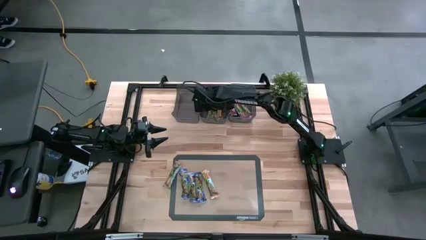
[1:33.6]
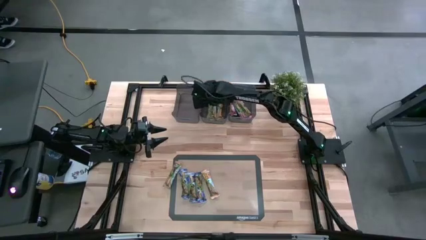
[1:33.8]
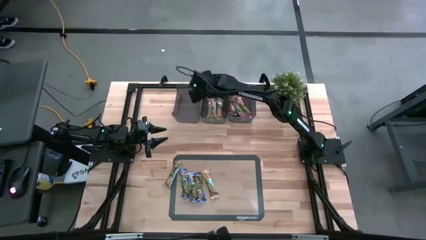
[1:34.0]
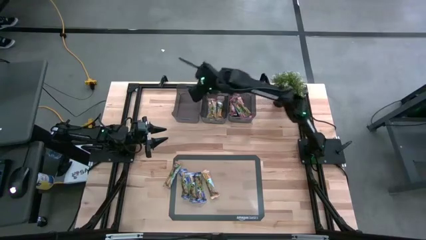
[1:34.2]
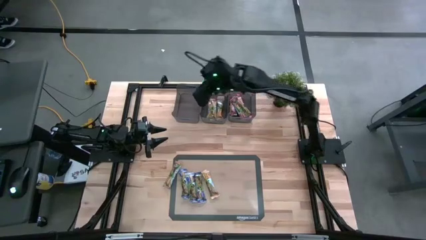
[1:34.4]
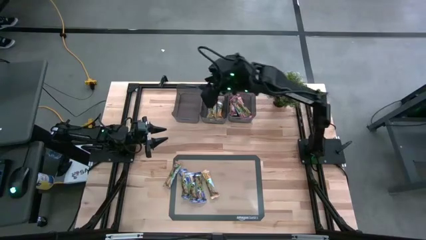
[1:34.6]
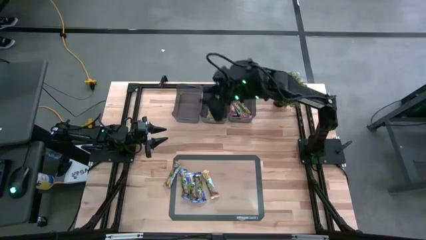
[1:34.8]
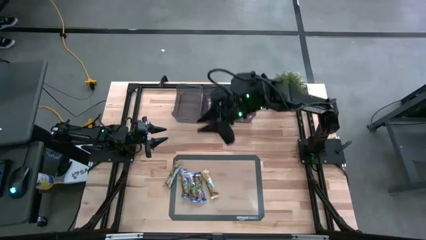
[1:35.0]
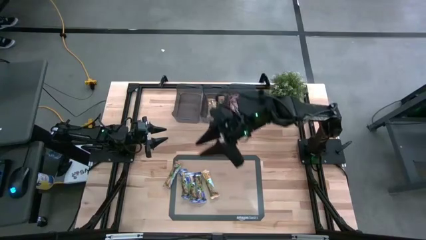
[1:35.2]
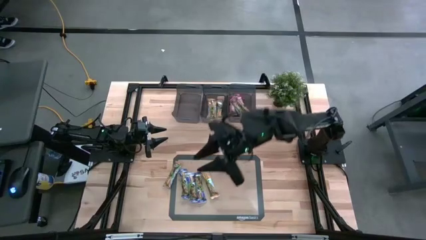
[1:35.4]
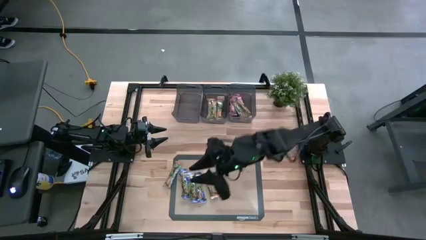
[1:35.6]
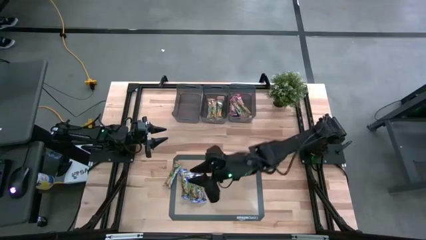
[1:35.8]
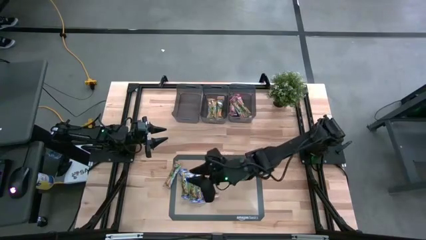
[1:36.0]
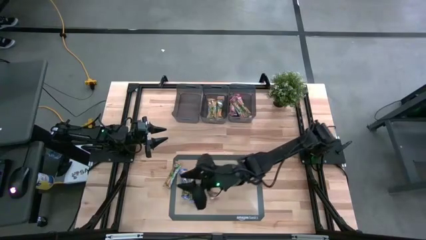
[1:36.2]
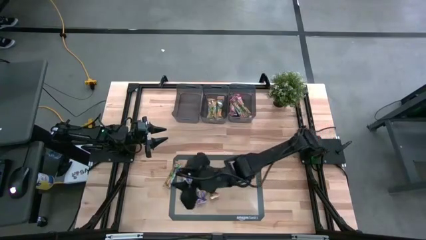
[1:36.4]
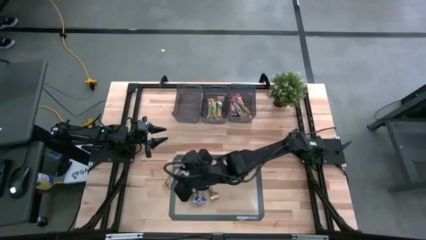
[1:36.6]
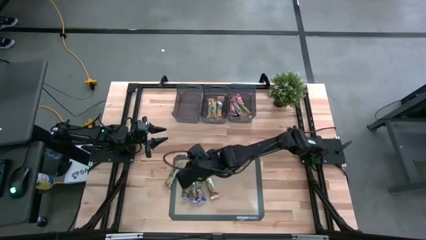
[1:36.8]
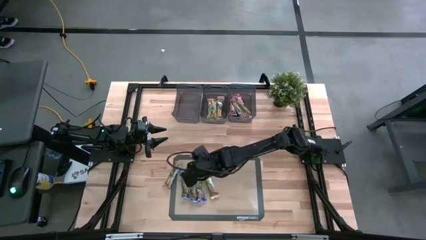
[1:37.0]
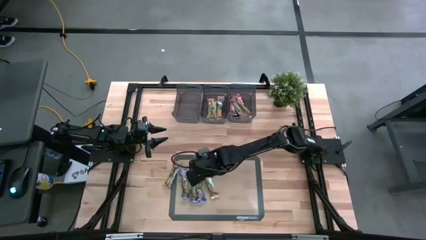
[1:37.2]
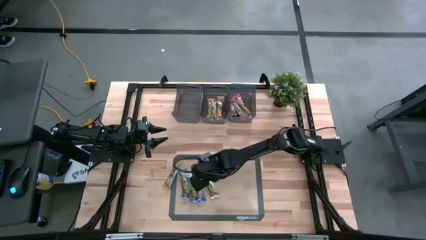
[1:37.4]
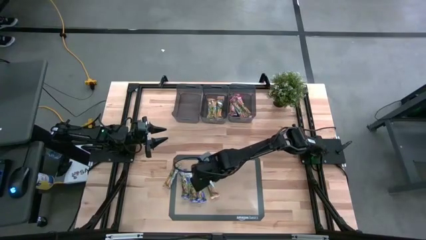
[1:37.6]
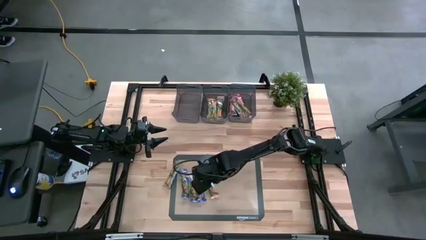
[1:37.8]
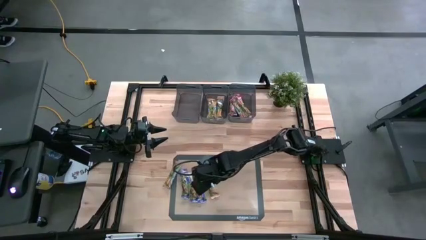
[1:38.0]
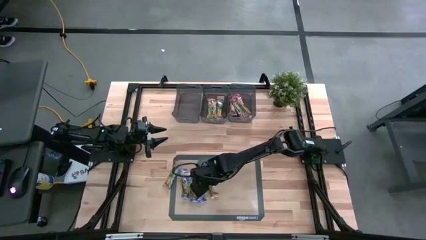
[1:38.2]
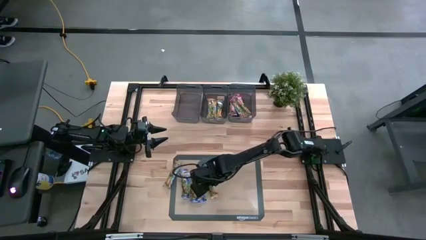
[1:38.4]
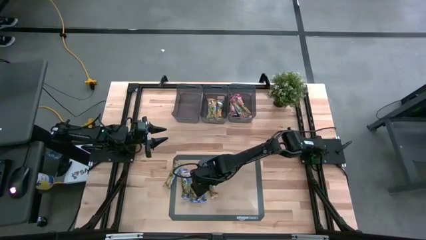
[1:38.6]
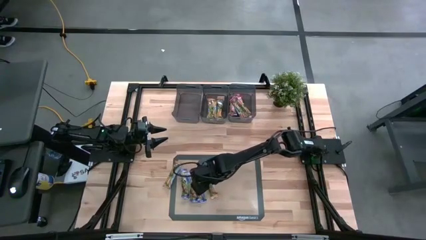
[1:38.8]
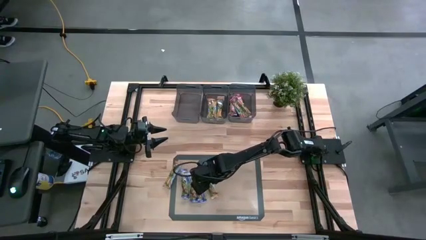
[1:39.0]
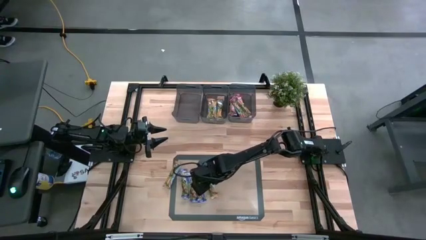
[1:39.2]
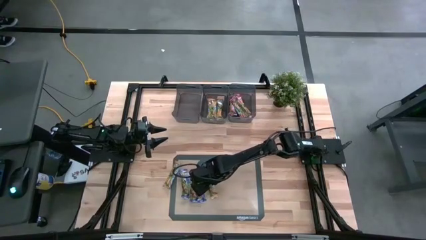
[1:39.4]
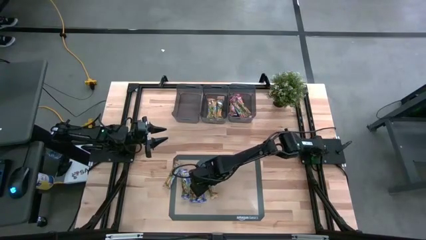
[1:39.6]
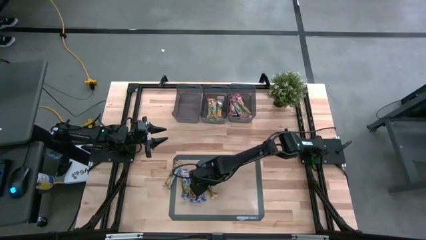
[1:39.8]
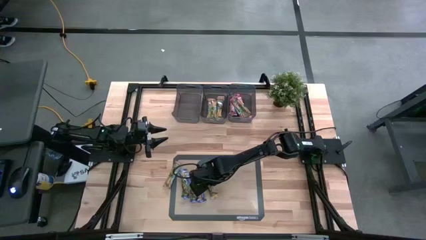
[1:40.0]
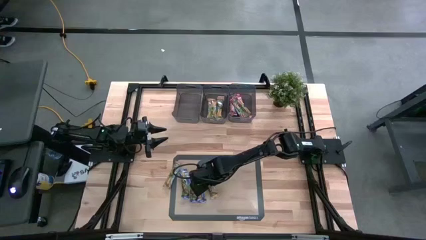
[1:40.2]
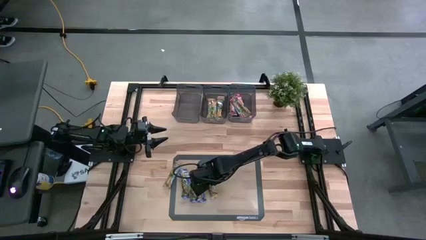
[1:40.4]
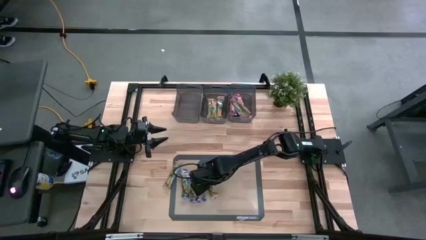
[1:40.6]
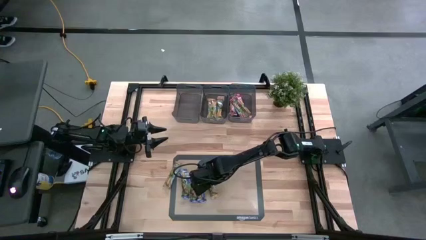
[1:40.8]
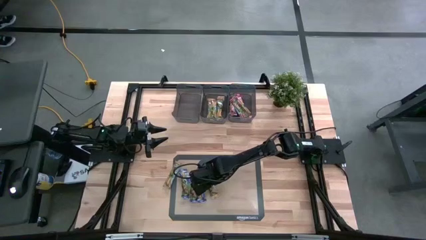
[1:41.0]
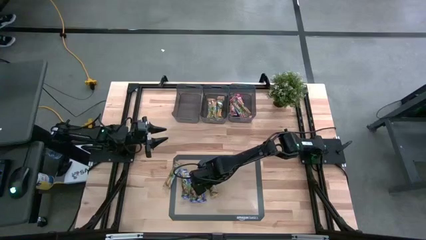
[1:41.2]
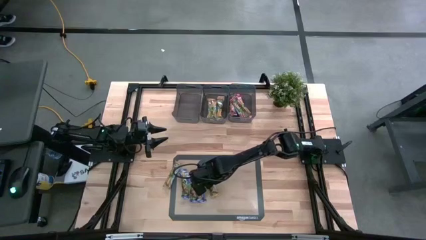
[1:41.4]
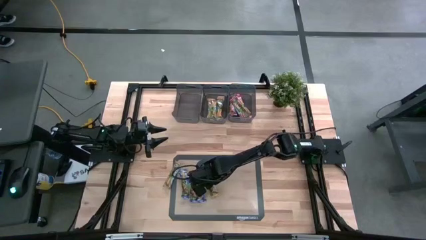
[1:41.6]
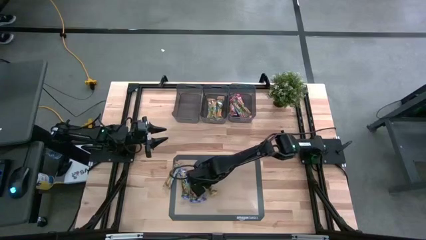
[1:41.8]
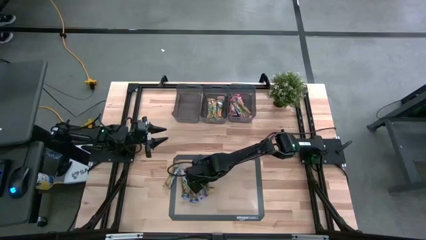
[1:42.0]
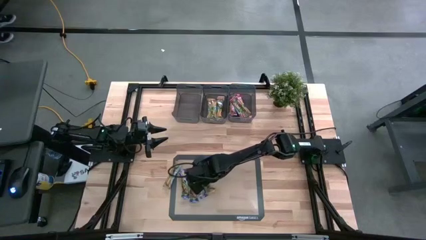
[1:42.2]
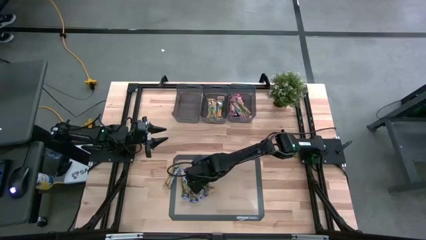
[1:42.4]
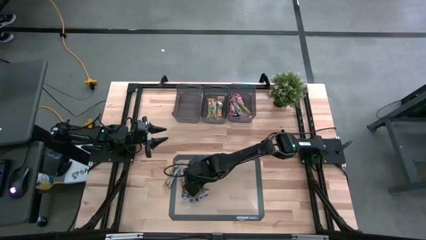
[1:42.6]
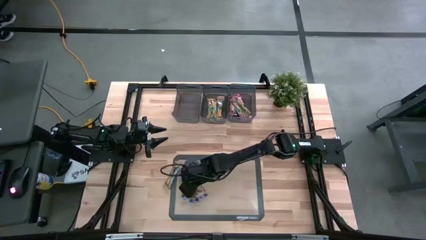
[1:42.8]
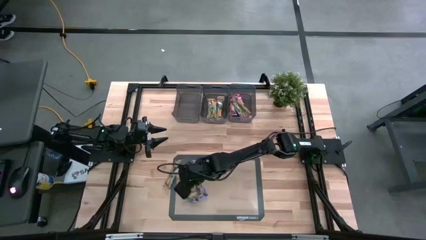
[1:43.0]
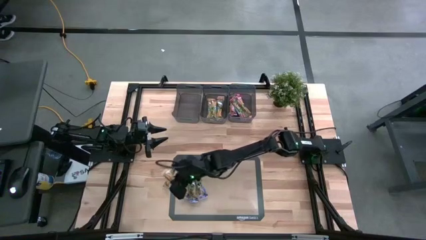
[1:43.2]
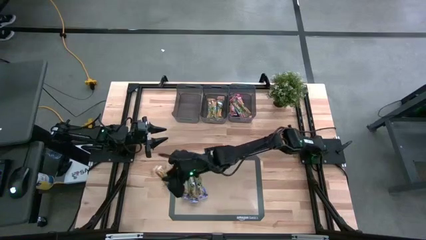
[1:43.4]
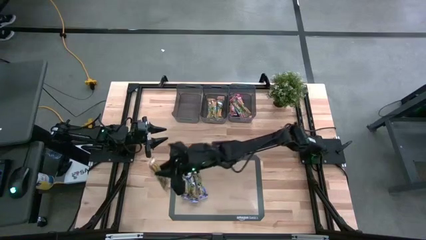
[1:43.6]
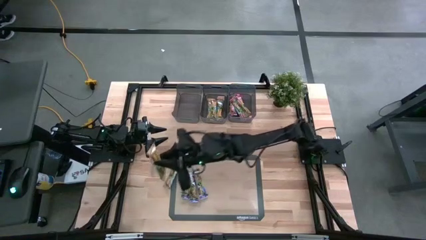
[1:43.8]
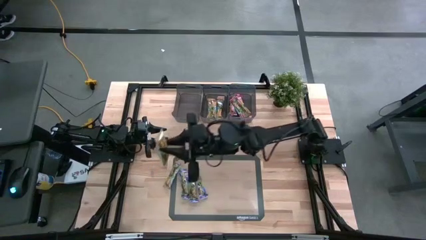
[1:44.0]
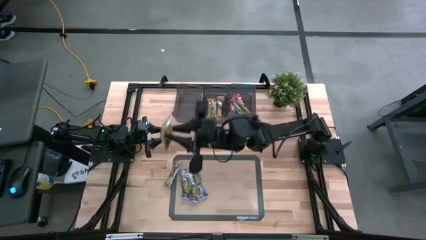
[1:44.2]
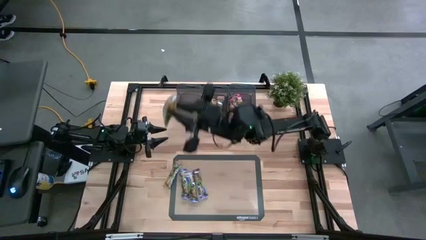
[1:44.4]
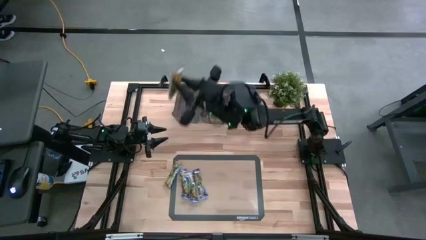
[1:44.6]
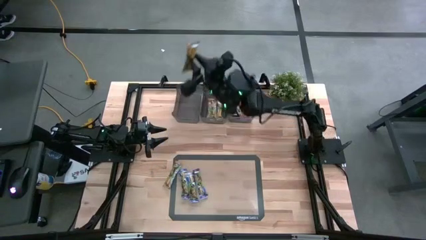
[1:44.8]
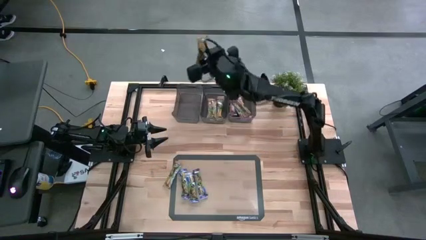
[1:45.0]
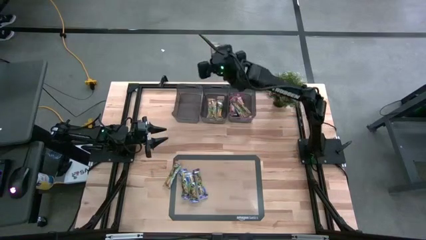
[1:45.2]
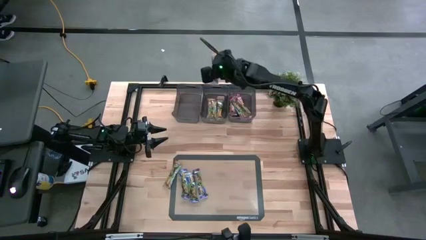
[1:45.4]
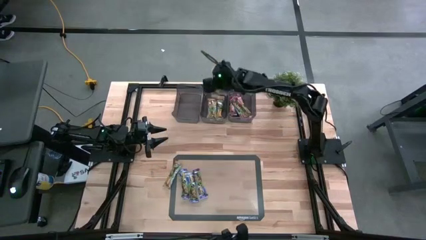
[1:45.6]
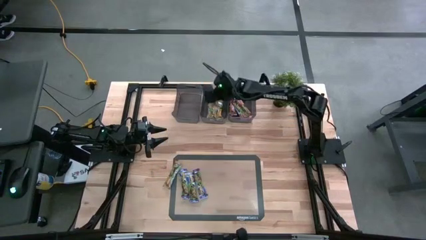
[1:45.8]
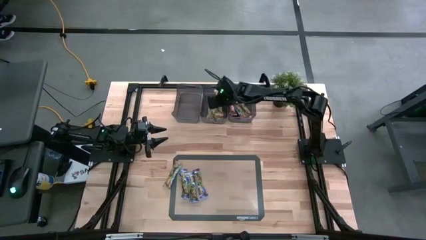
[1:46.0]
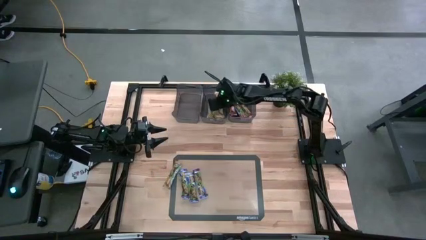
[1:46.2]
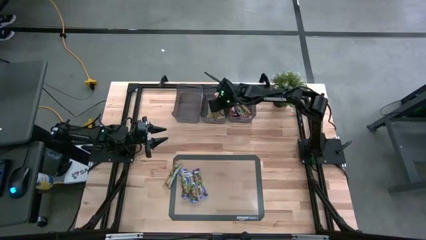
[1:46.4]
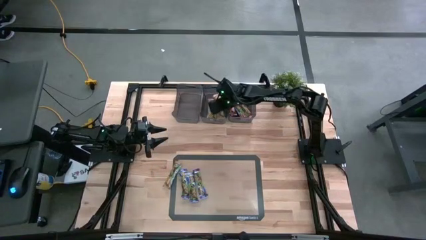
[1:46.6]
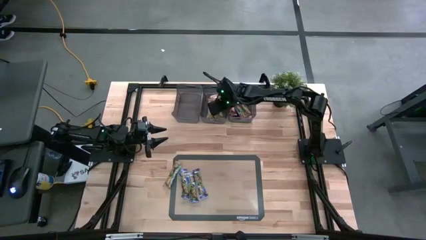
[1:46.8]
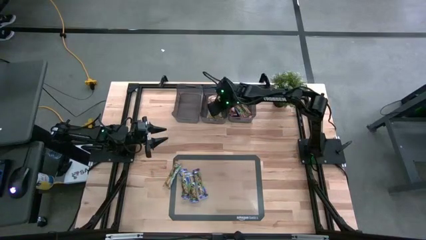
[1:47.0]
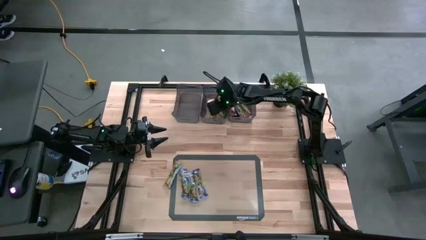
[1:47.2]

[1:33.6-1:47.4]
Task: Pick and place Granola Bars by type
Put the orange granola bar into the middle black bin

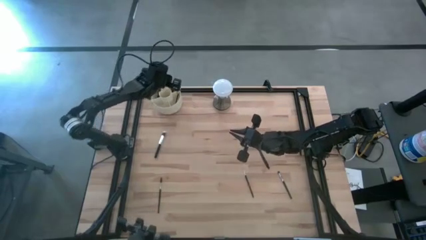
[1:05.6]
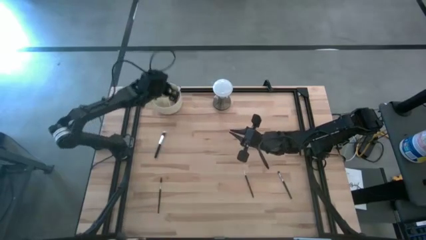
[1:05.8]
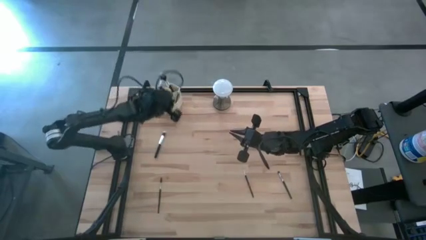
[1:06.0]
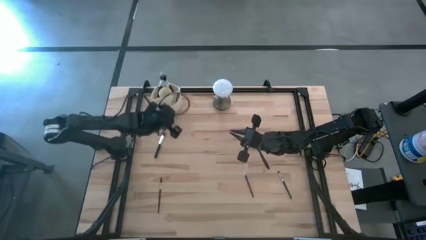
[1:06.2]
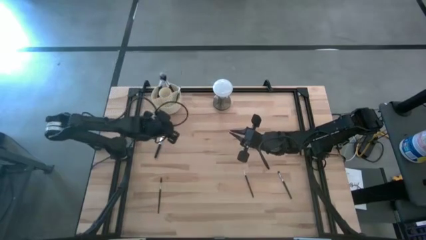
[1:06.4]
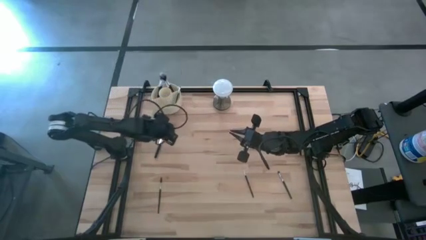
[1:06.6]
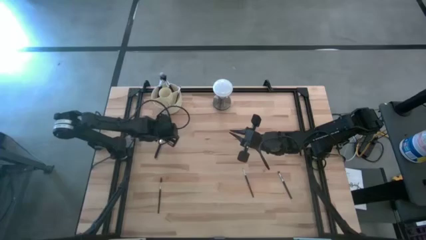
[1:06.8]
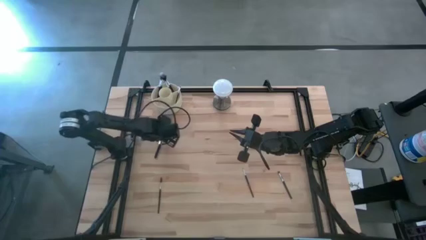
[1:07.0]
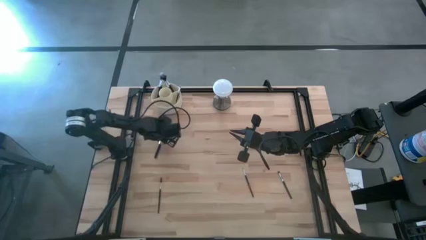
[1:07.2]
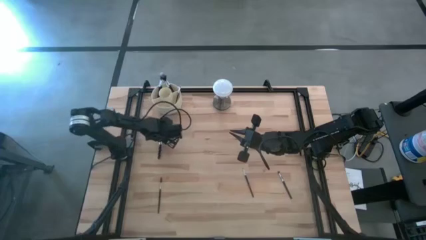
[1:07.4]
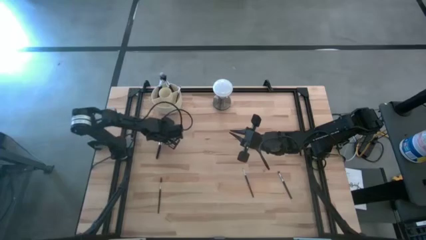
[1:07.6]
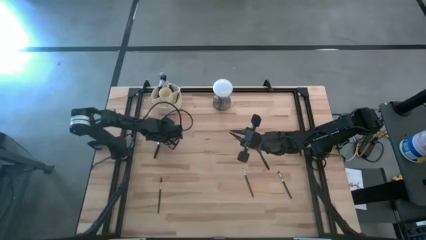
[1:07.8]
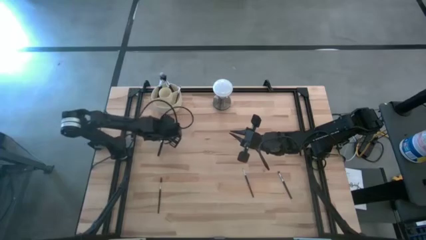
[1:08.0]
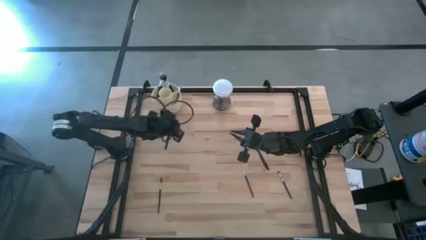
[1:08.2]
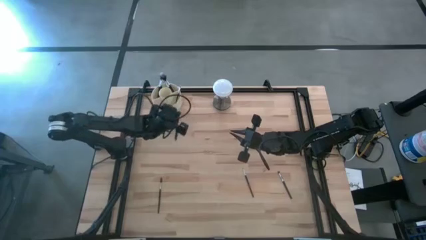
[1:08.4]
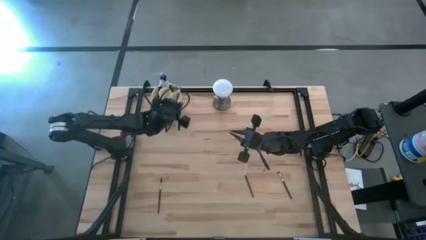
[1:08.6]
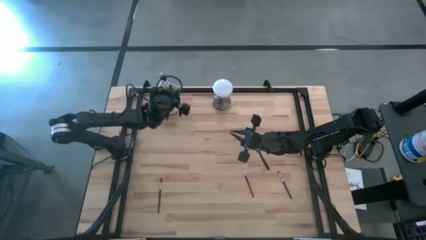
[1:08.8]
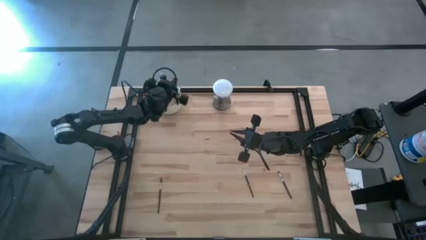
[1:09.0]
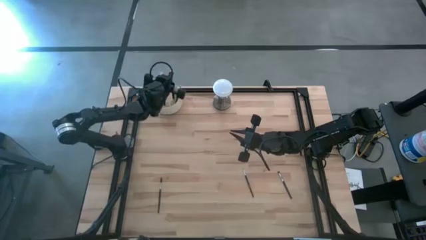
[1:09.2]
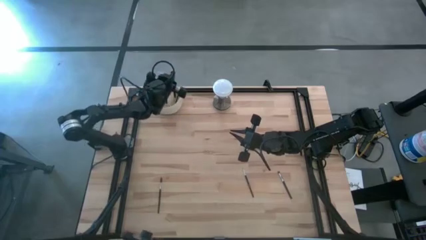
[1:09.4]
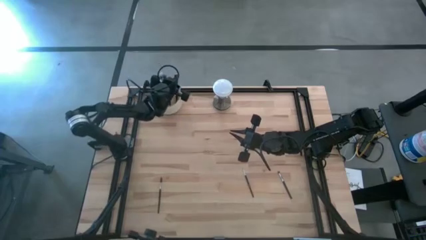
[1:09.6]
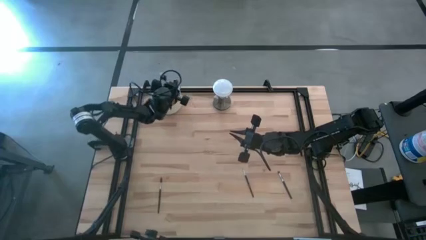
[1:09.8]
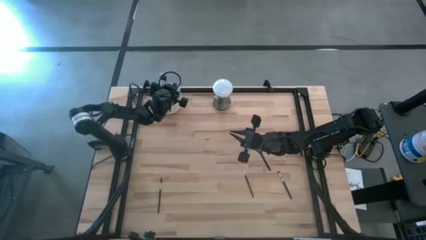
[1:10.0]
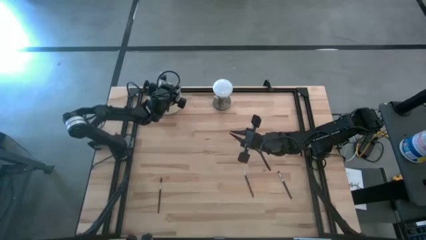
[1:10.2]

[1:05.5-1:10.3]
Task: Put items in baskets/containers
Put the powder brush into the organizer
